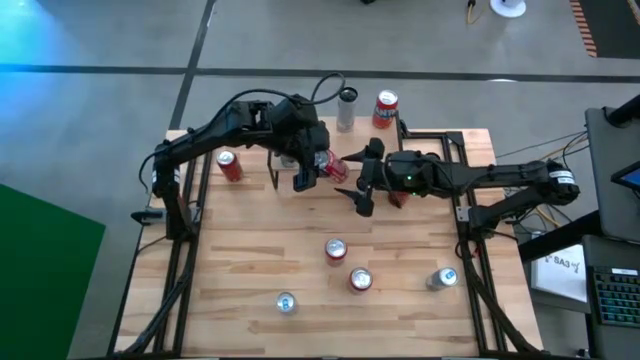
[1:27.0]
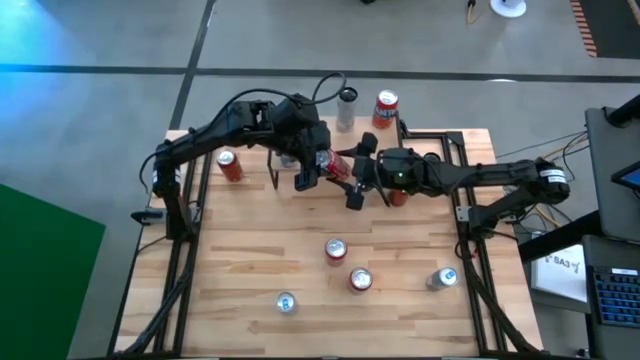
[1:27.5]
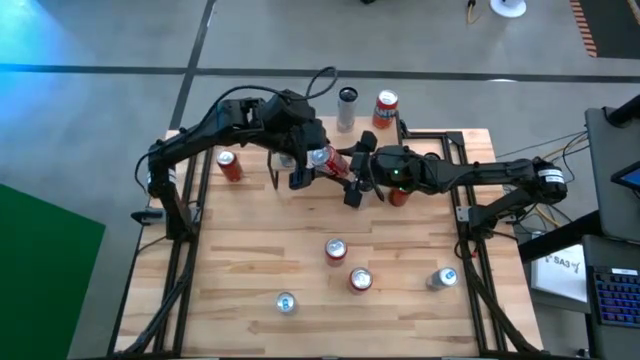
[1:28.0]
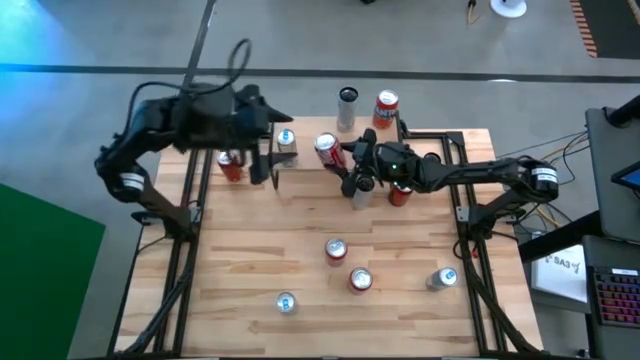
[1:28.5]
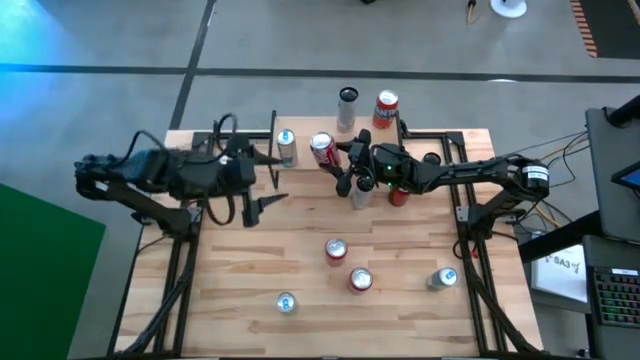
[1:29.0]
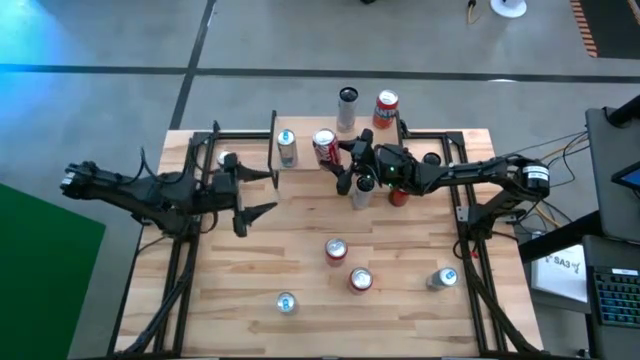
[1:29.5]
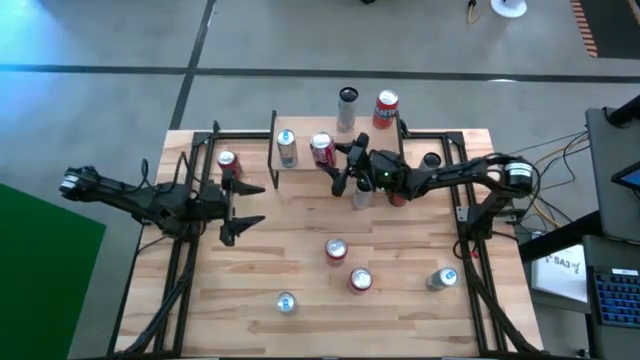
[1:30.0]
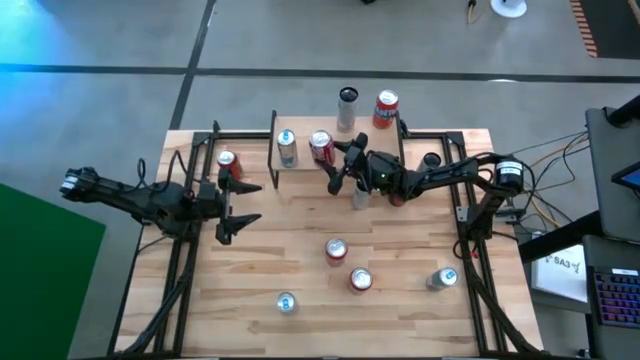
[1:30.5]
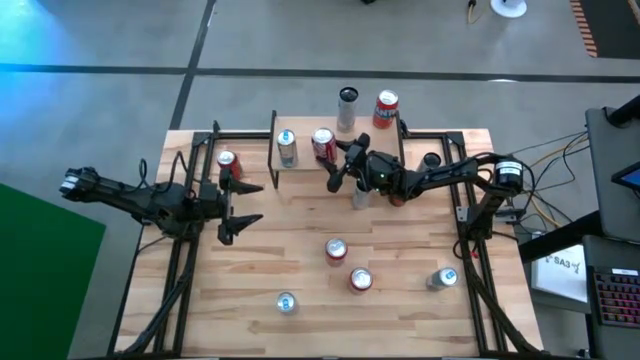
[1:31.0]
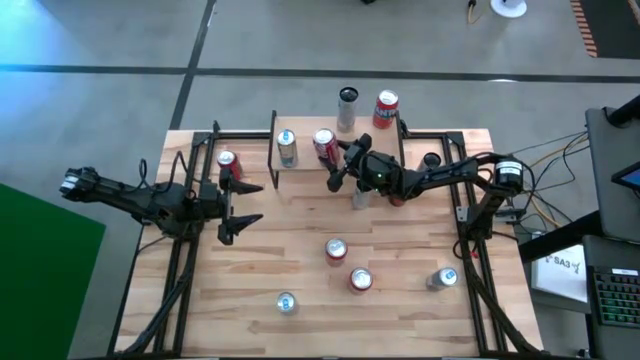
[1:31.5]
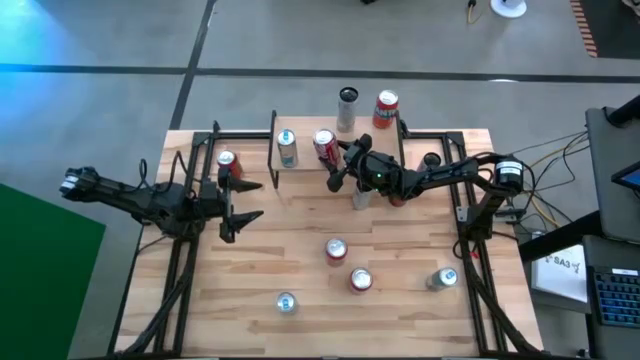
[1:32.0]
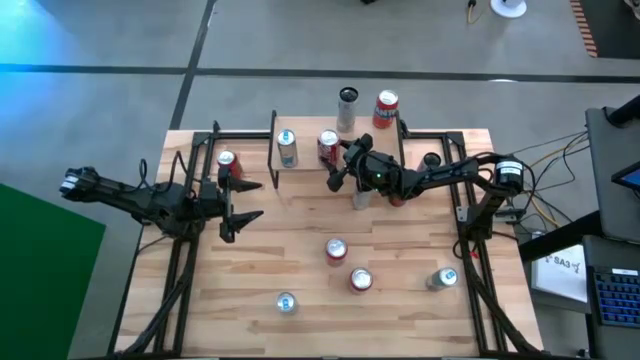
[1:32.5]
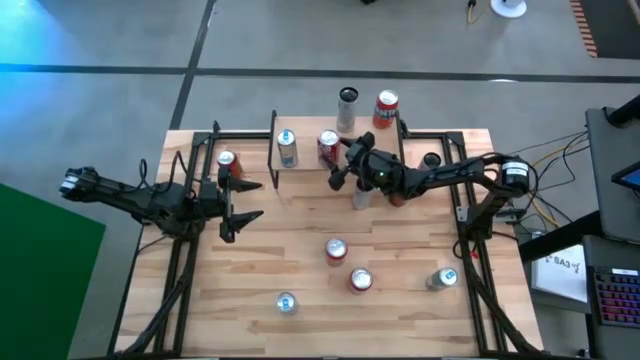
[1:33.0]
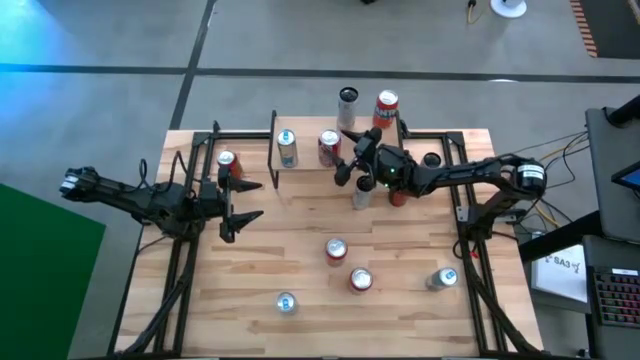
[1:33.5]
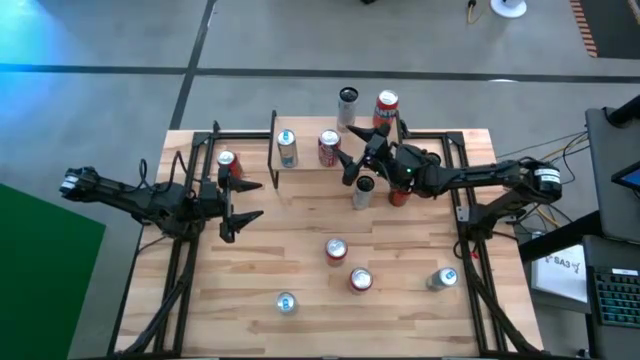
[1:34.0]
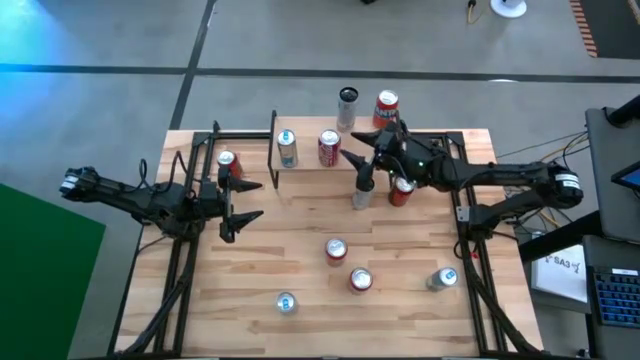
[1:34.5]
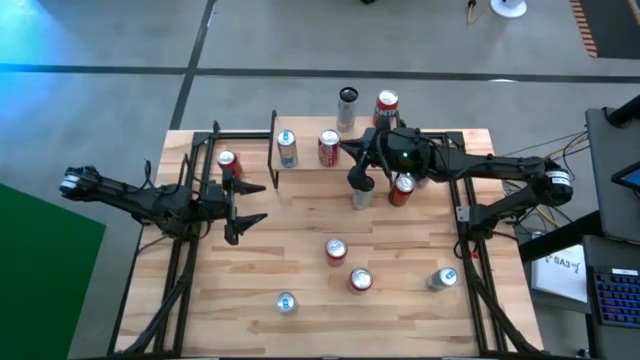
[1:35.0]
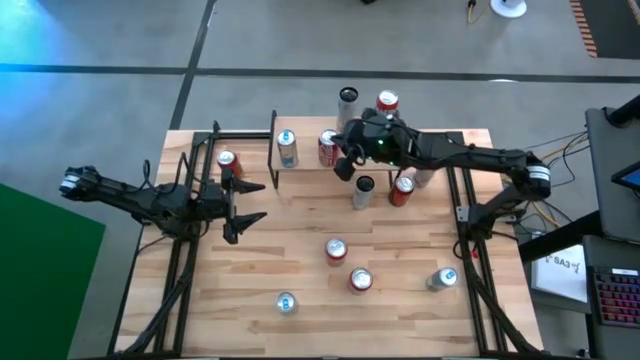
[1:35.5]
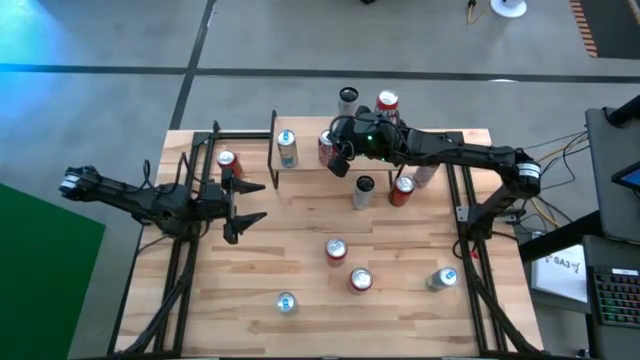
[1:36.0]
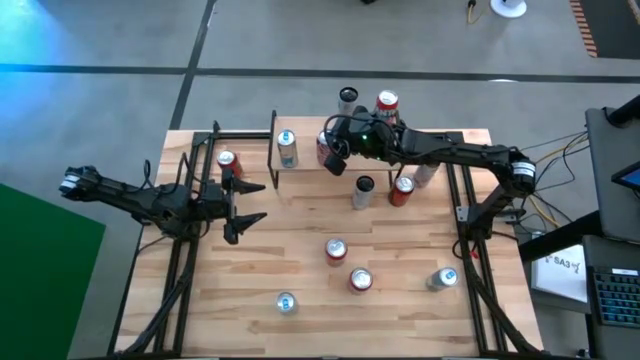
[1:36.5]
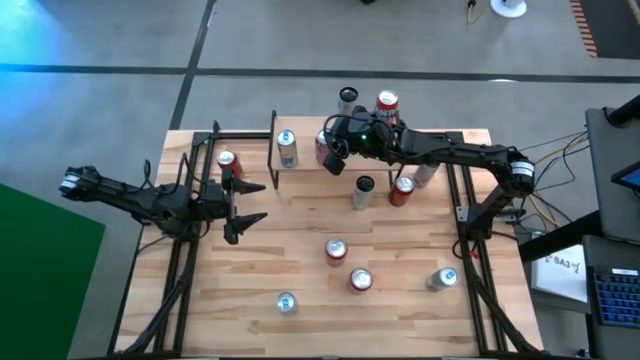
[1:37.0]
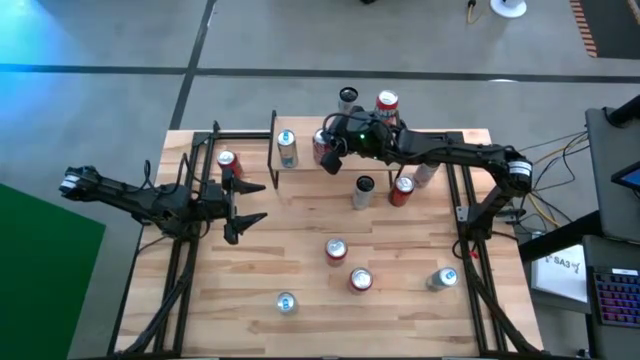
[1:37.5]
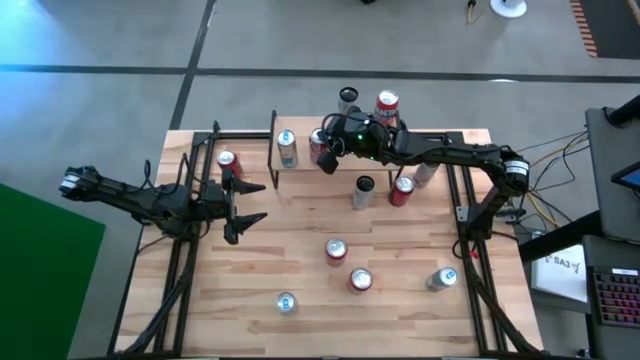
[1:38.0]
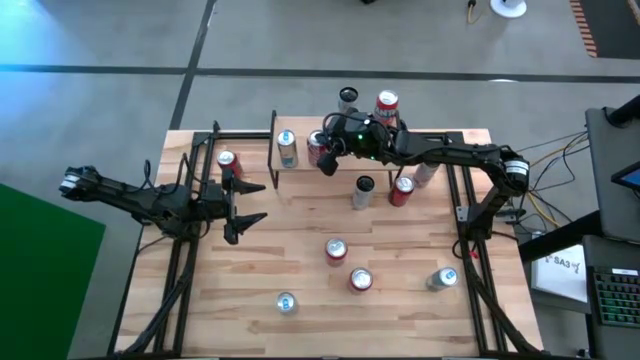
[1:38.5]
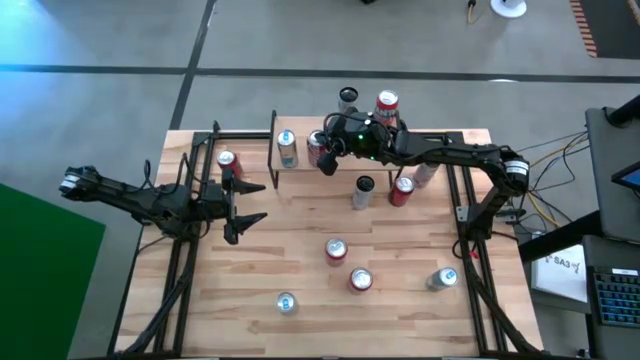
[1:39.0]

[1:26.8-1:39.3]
Task: Place canned beverage on shelf
Put the bottom left red black soda can on the shelf

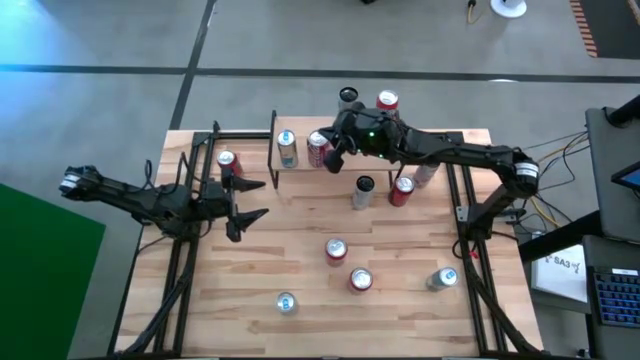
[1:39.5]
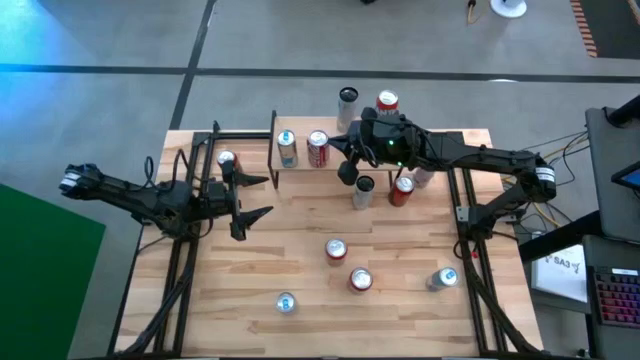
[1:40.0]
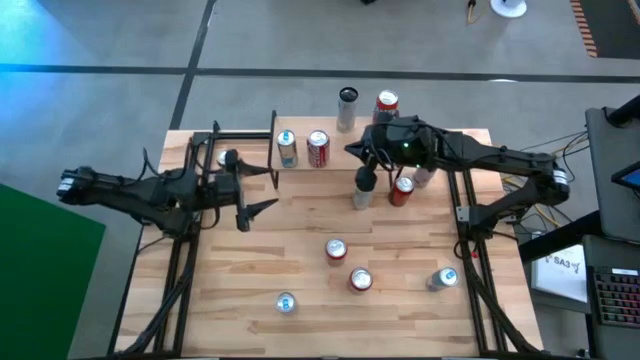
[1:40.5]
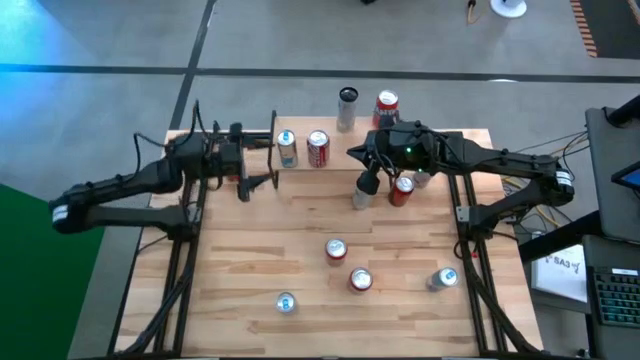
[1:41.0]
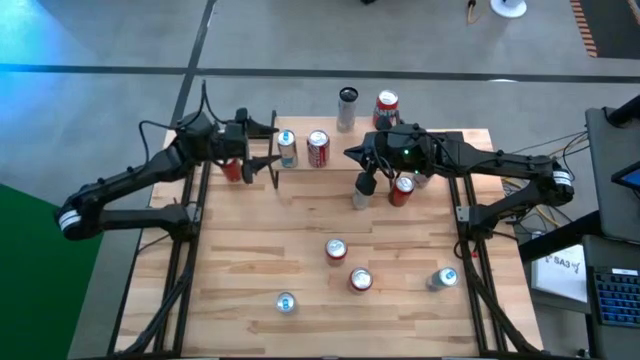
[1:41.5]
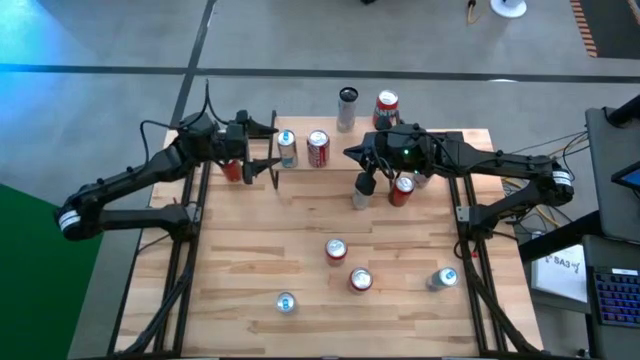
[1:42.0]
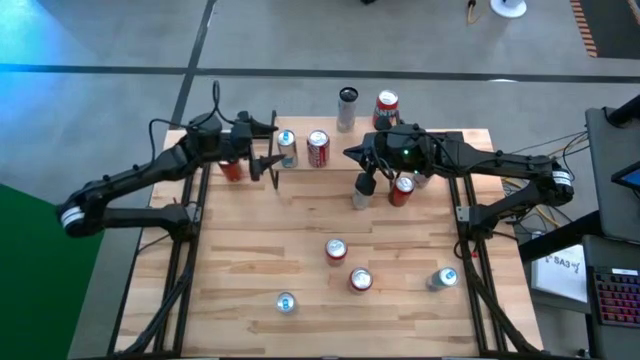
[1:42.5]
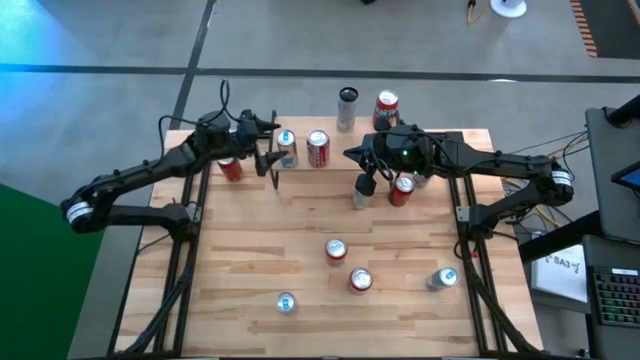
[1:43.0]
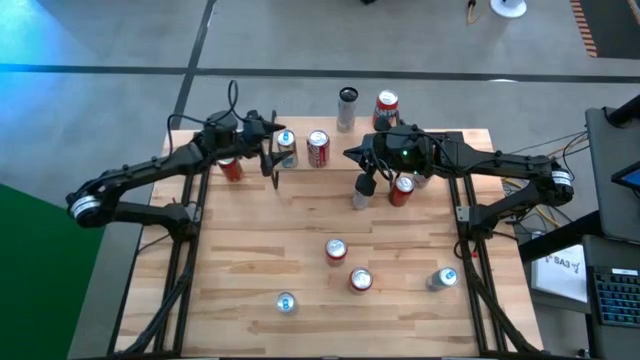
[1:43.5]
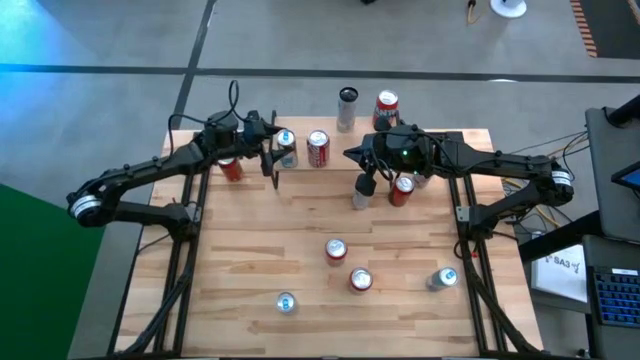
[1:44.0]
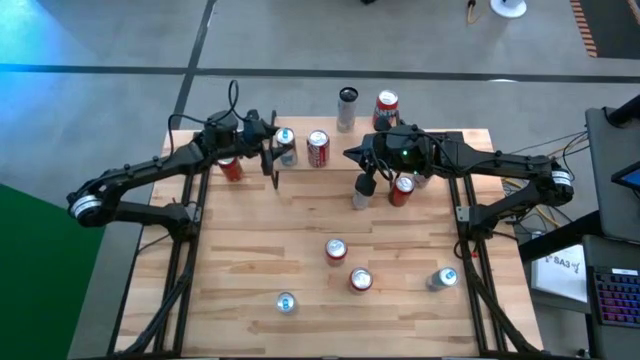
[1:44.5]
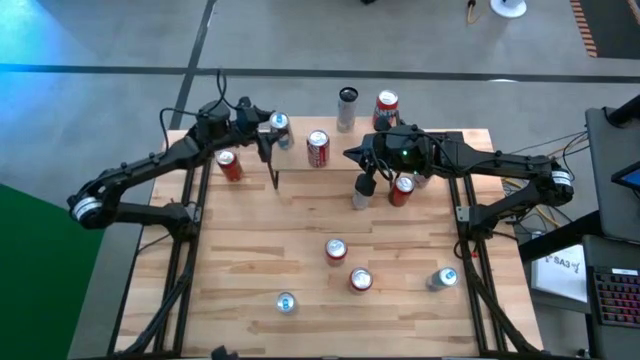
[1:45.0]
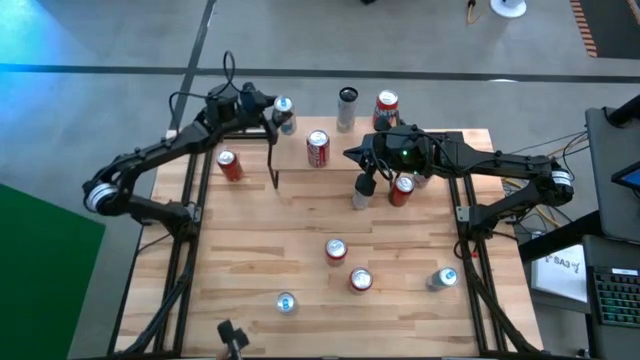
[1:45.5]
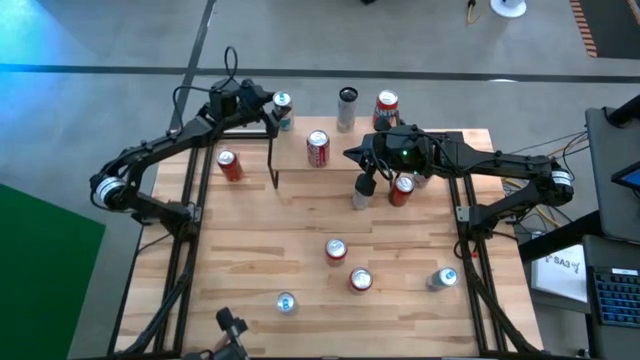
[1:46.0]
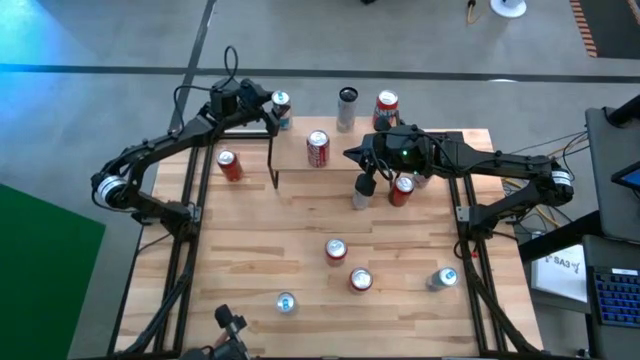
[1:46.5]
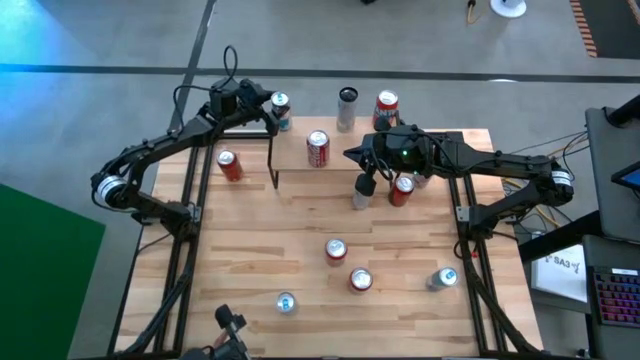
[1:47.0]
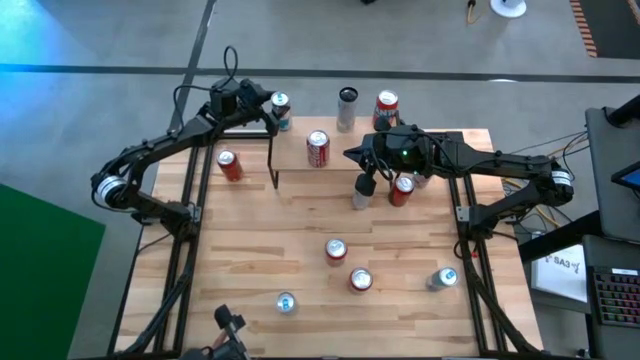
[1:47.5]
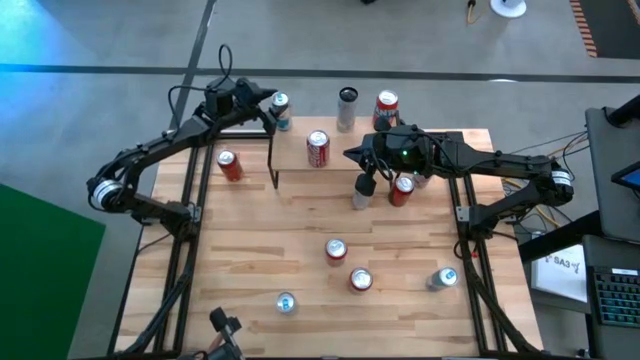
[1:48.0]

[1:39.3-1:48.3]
Adjust the blue soda can on the shelf
